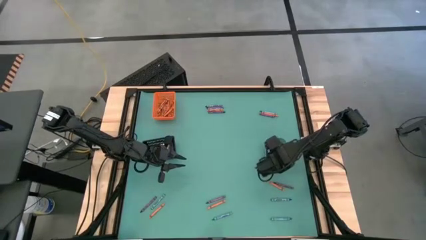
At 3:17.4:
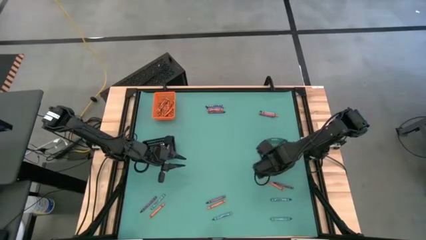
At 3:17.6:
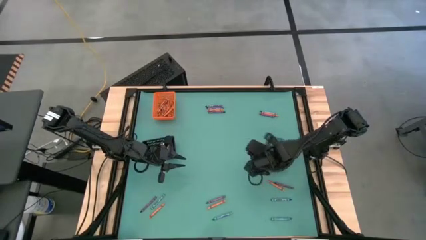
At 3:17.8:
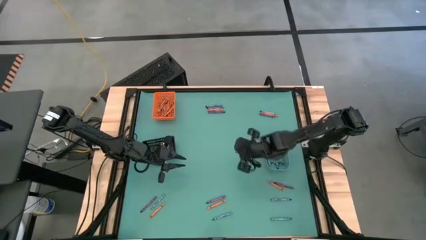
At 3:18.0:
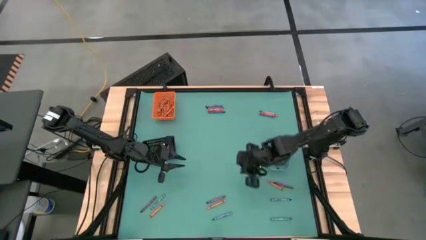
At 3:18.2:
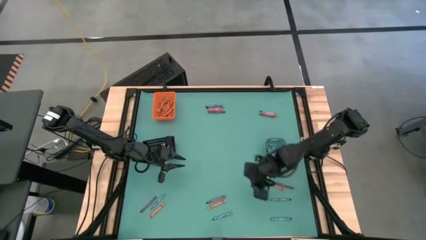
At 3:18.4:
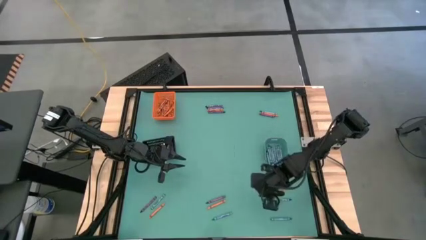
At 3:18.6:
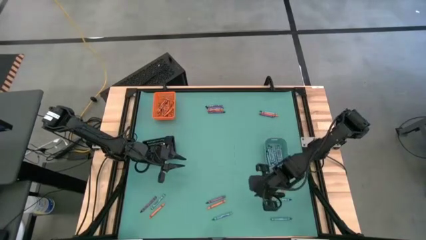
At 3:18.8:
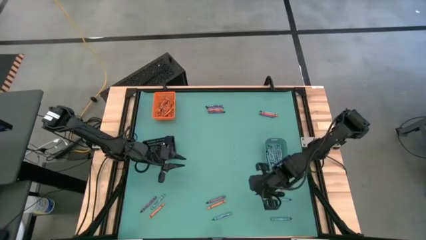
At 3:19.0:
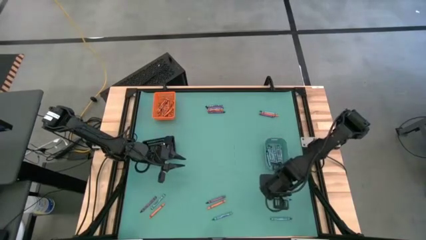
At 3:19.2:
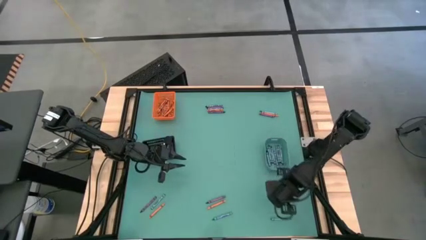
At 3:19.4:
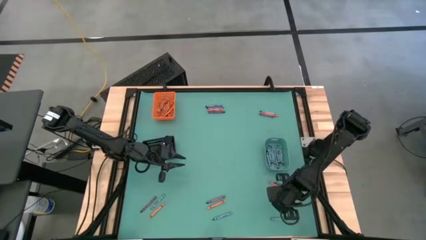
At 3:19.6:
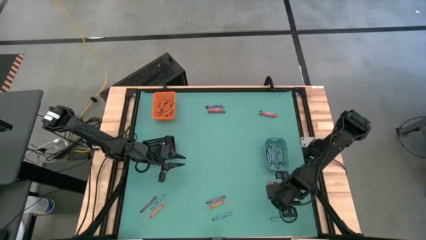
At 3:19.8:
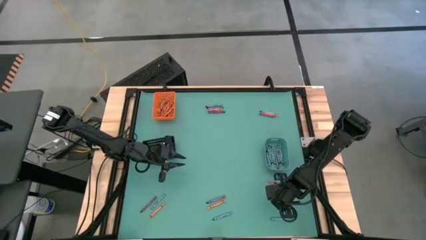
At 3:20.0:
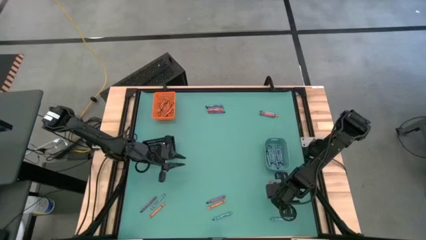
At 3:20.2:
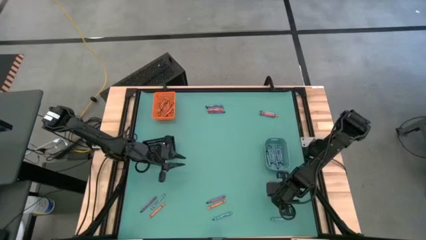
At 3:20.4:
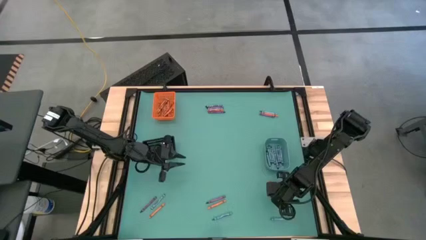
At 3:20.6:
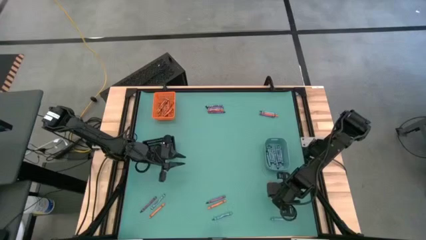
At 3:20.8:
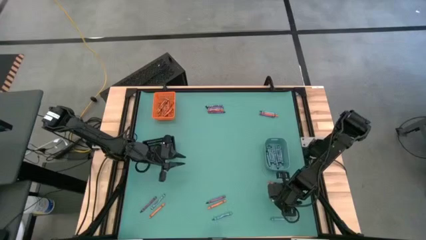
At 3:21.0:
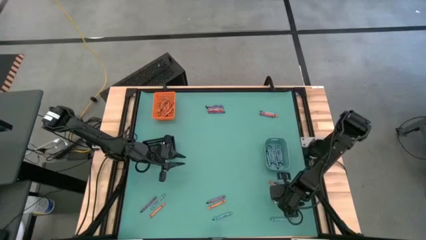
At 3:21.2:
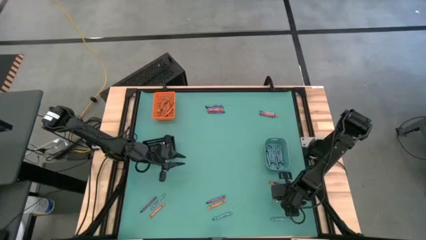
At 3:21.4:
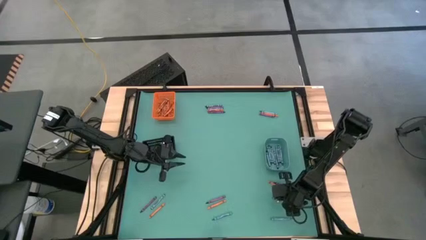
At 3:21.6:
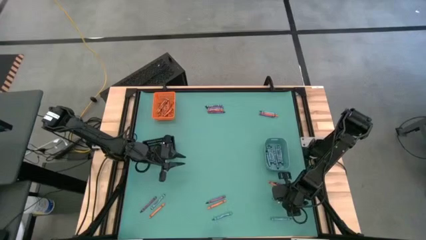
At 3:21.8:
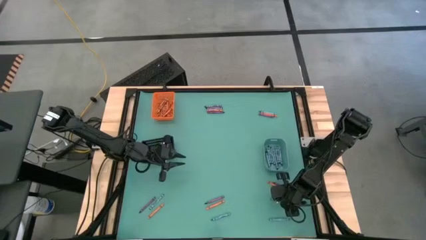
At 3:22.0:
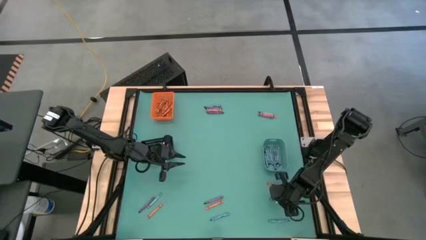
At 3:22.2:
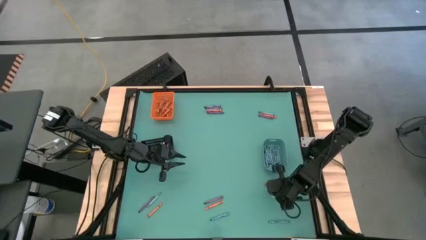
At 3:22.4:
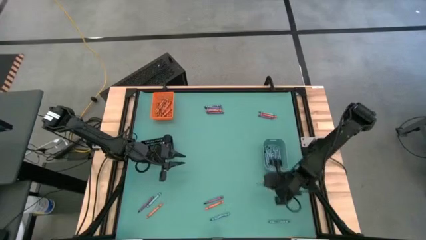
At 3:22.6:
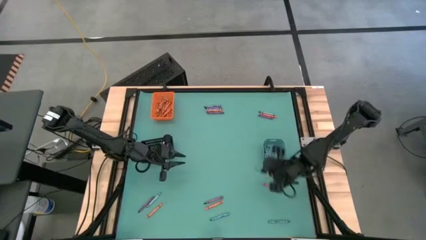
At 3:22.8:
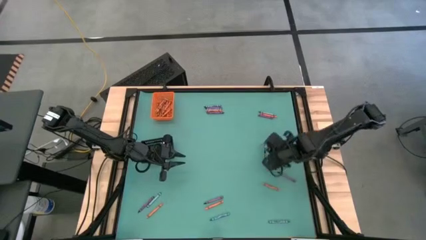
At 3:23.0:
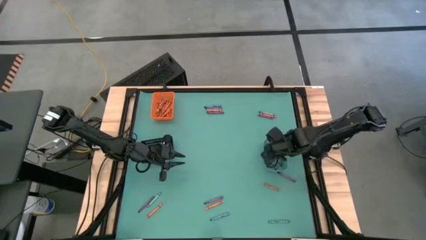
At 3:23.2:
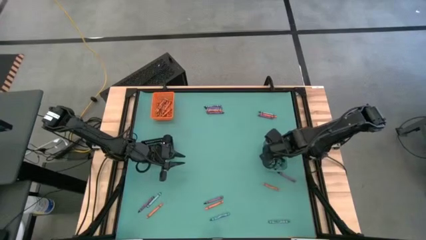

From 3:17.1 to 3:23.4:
Task: Sort crayons
Put the blue crayon into the blue bin

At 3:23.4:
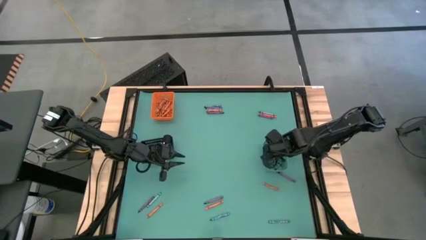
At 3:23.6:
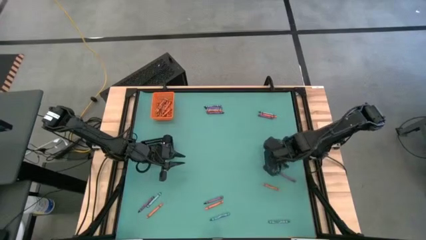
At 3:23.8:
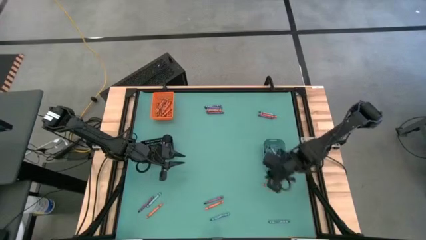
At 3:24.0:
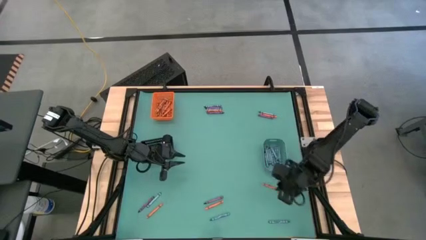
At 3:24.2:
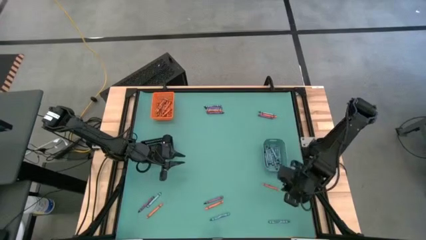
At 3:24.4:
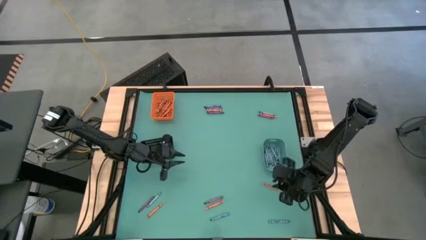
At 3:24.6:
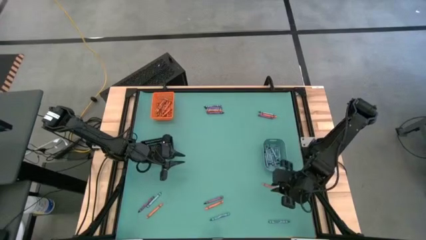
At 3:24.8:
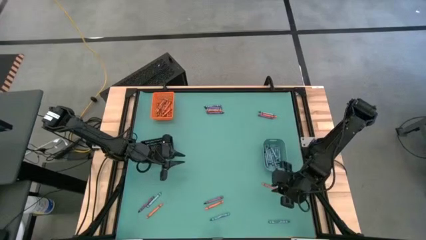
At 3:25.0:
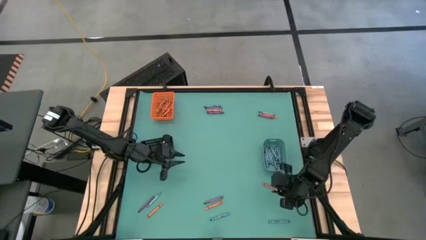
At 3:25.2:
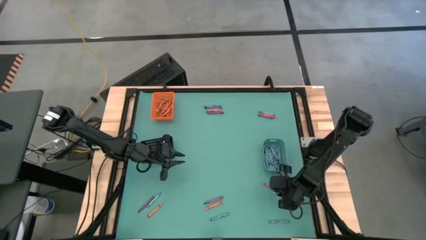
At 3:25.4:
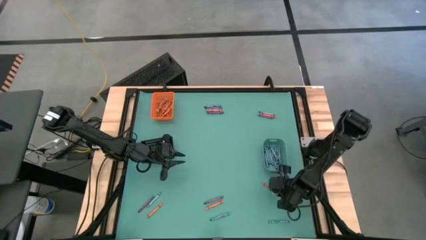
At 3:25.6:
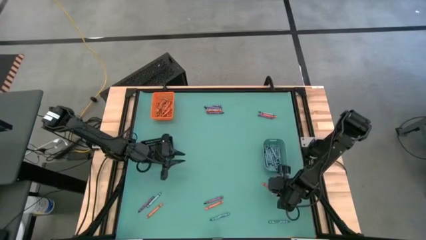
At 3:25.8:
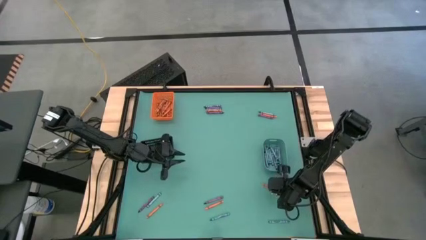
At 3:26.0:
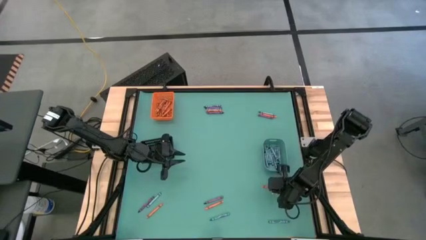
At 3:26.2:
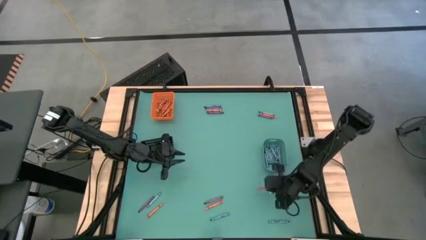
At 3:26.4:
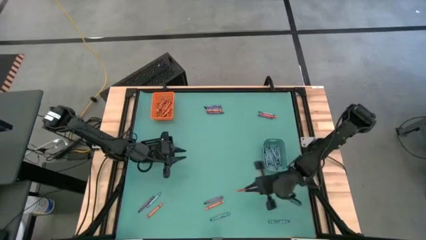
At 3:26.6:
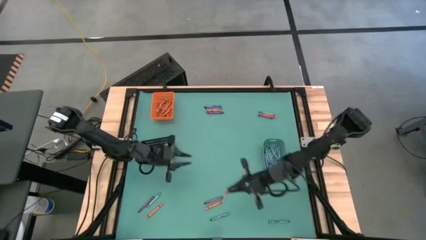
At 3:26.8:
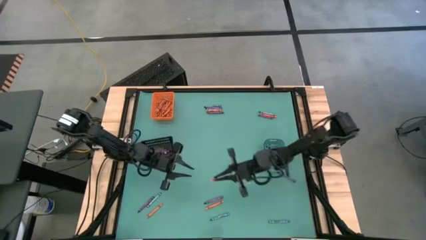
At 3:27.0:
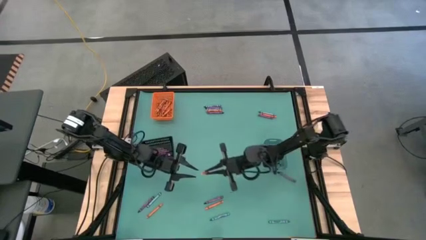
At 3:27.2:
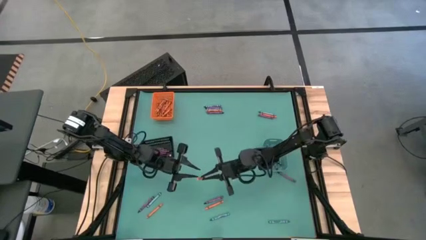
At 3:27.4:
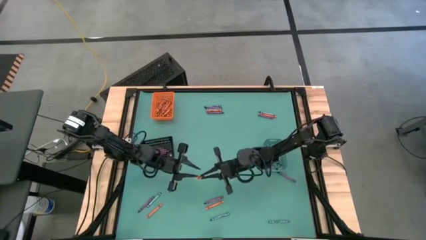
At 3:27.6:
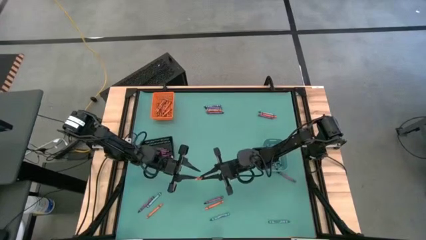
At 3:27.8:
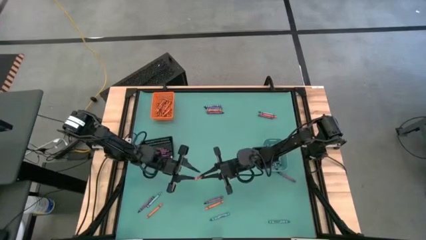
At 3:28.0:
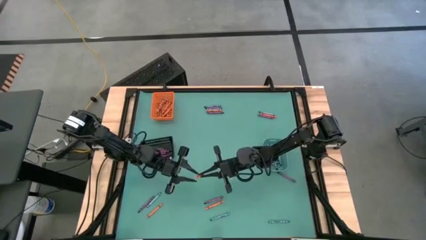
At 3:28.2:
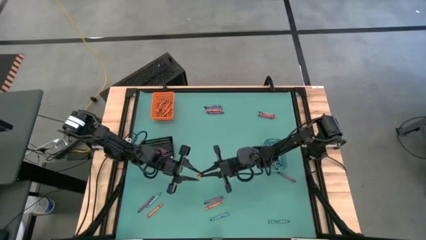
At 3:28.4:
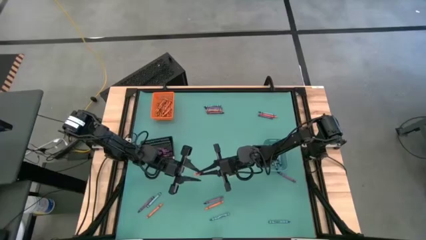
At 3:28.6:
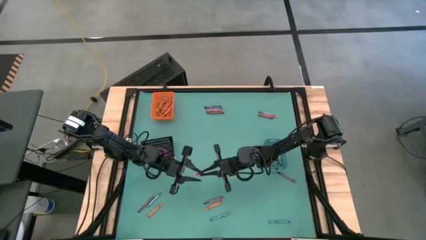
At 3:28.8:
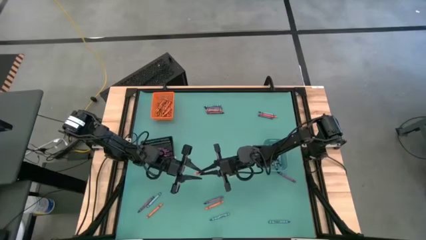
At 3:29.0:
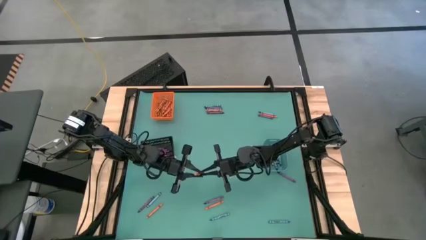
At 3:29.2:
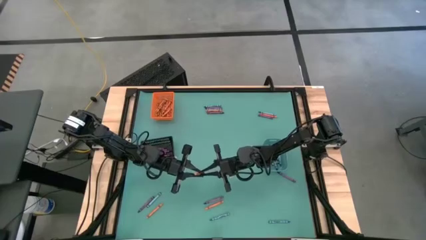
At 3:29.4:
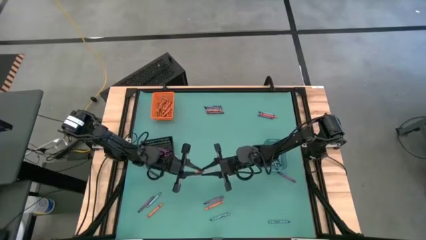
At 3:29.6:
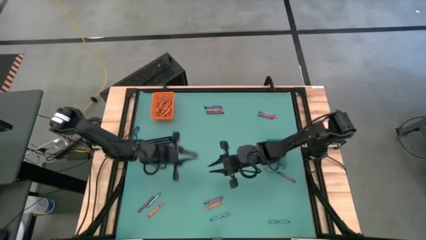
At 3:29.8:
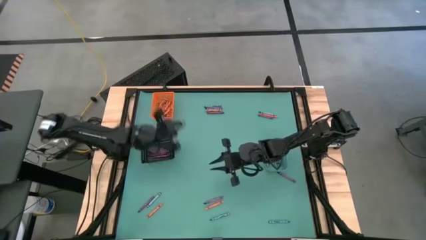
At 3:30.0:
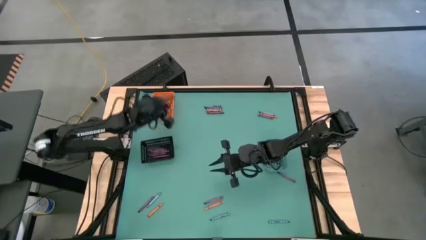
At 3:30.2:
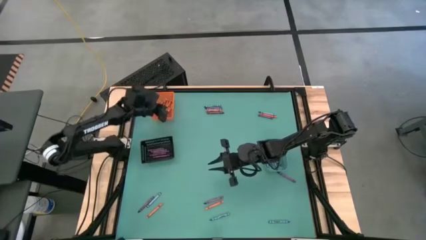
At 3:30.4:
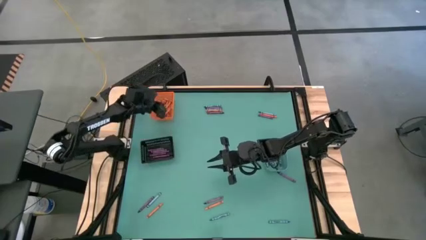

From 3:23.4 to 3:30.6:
Put the orange crayon into the orange bin

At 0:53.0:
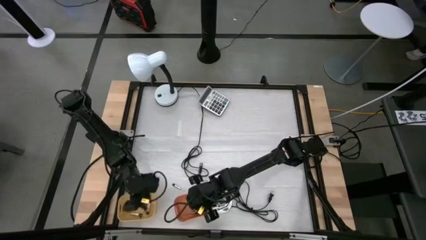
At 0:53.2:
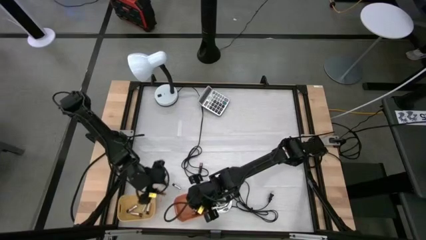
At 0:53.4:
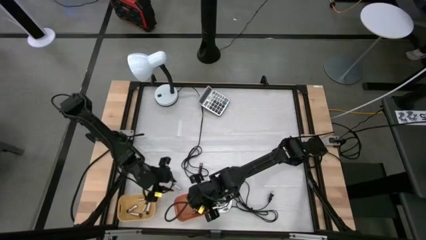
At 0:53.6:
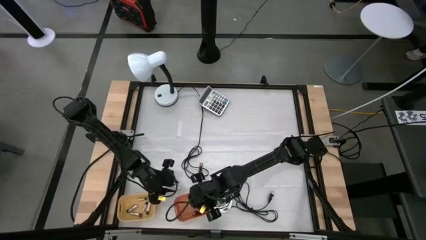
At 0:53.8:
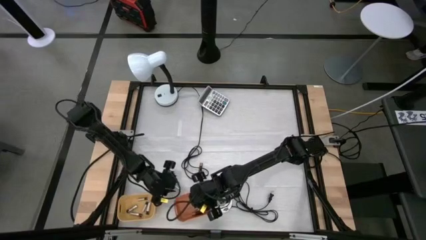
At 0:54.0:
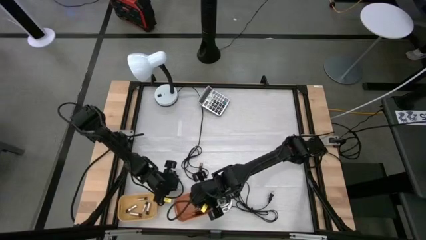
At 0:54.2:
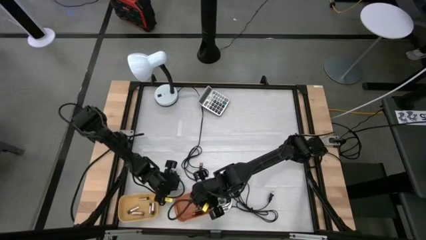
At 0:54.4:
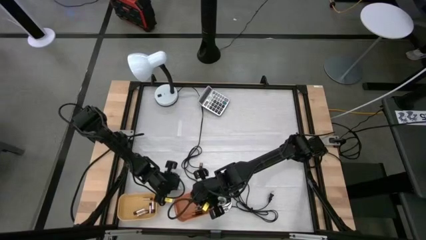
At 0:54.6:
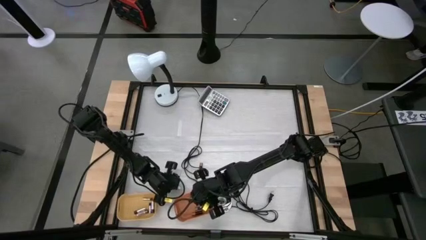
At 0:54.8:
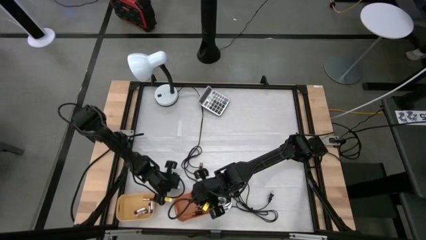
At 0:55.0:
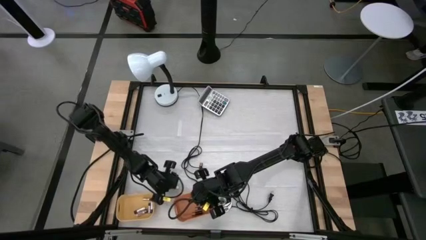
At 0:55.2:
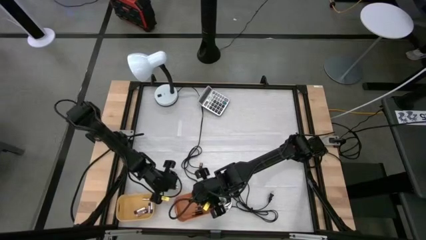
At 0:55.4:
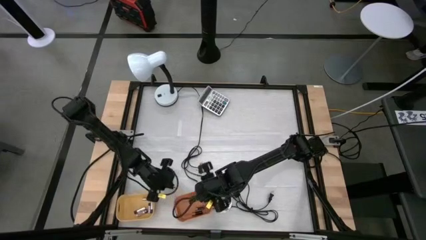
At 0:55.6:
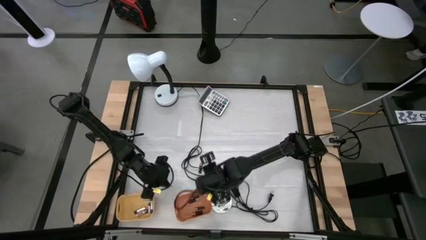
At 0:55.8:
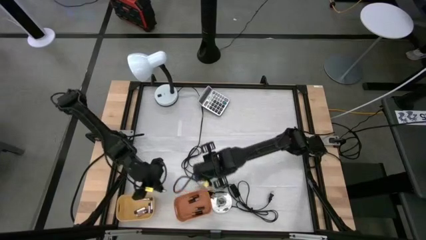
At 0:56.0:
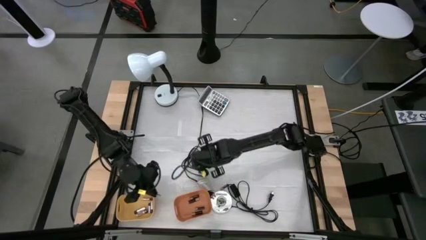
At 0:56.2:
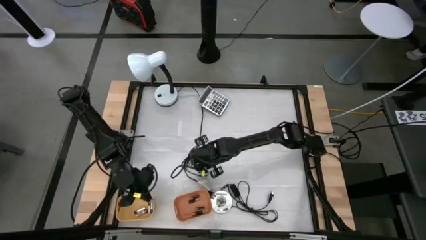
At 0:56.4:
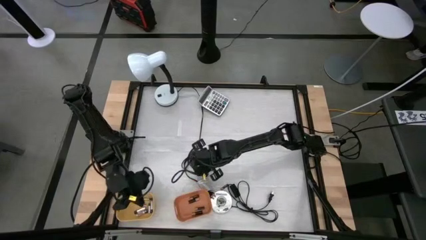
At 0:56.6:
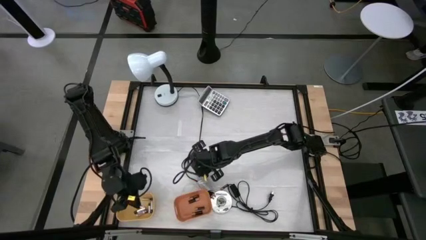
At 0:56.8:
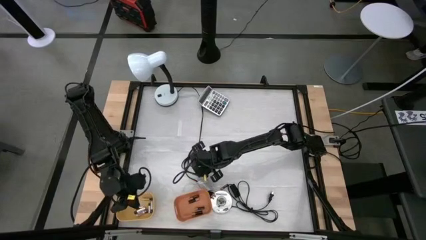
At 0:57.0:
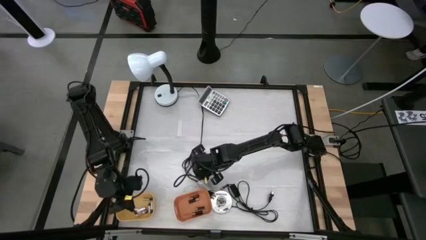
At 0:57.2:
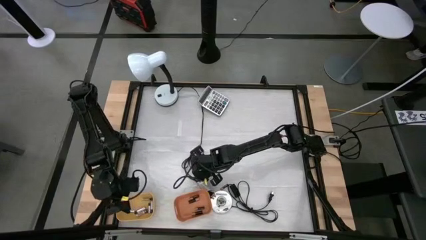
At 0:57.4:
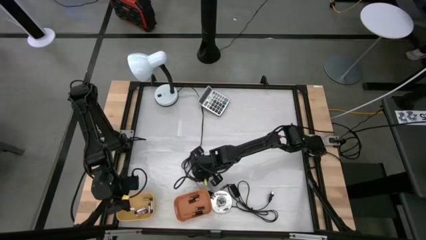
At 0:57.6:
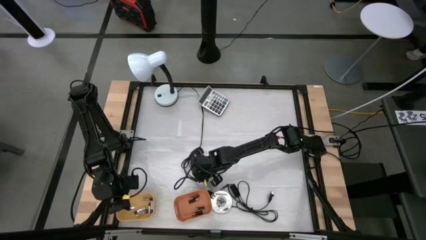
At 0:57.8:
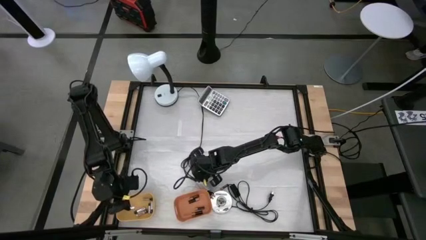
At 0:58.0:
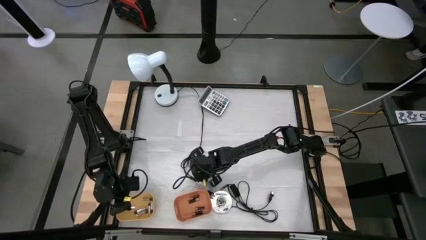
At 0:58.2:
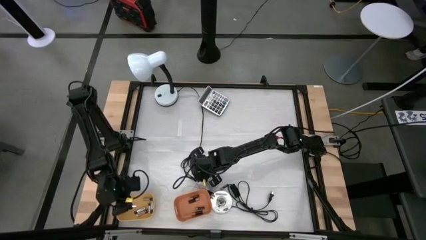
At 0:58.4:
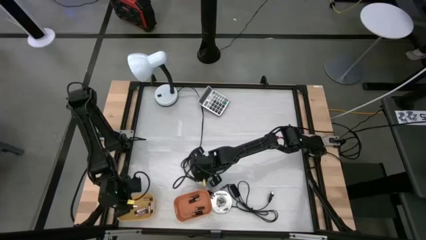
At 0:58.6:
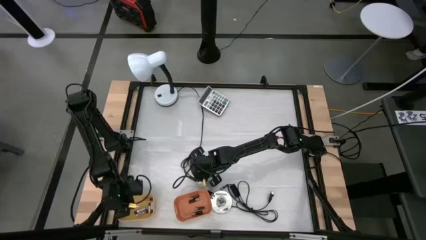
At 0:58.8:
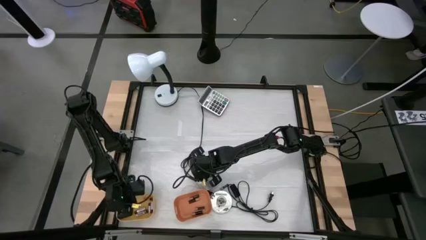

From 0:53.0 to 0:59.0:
Task: Sort batteries
Put the white battery into the yellow bin
